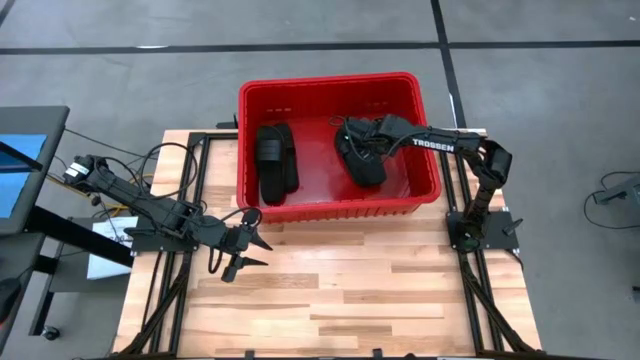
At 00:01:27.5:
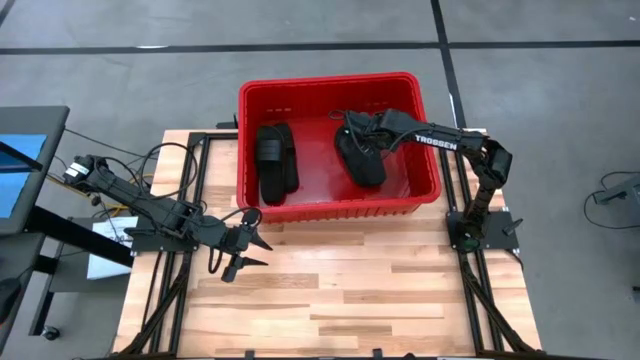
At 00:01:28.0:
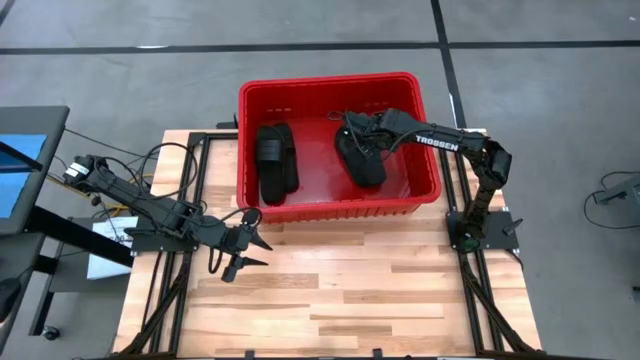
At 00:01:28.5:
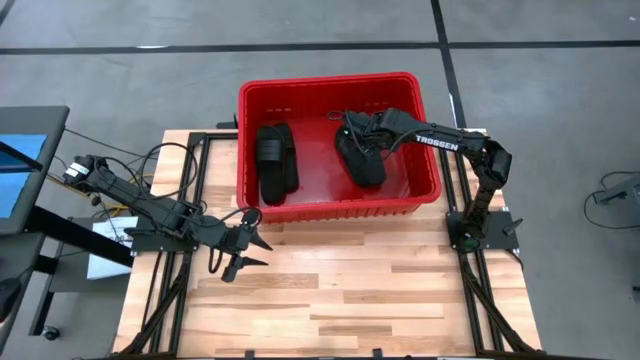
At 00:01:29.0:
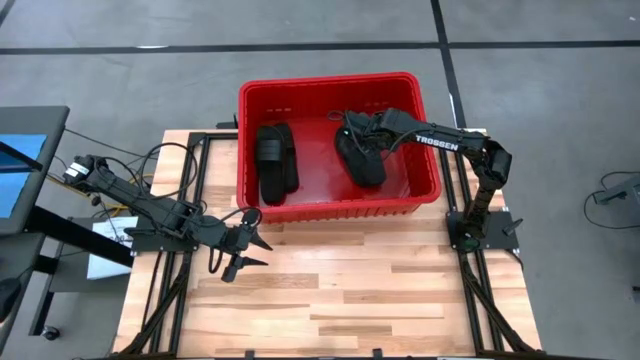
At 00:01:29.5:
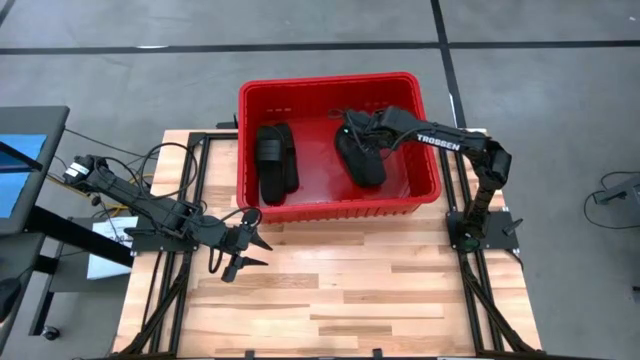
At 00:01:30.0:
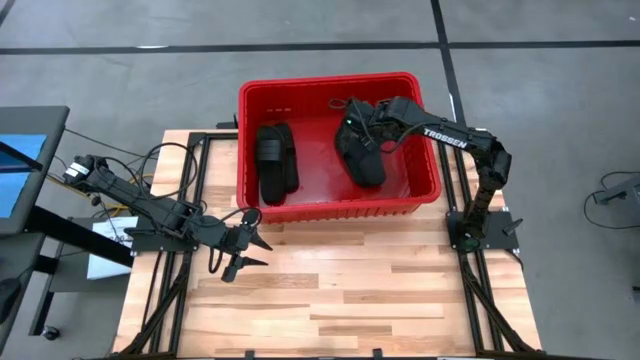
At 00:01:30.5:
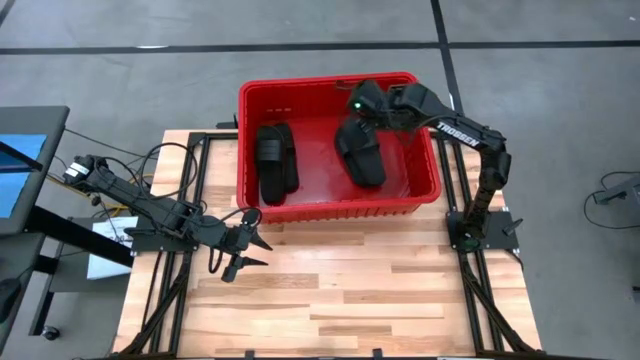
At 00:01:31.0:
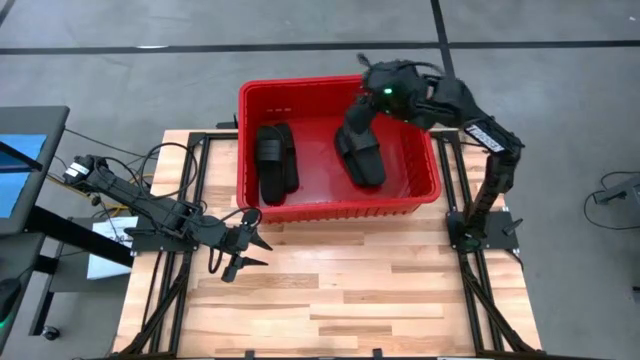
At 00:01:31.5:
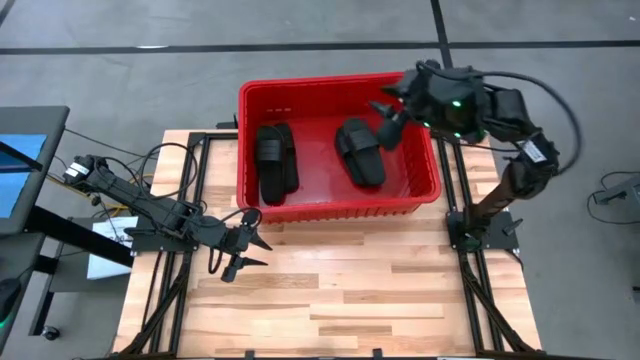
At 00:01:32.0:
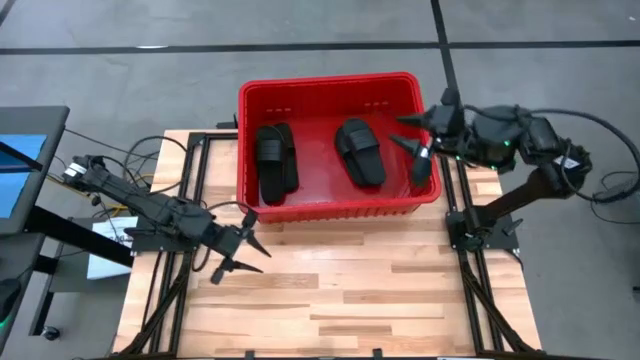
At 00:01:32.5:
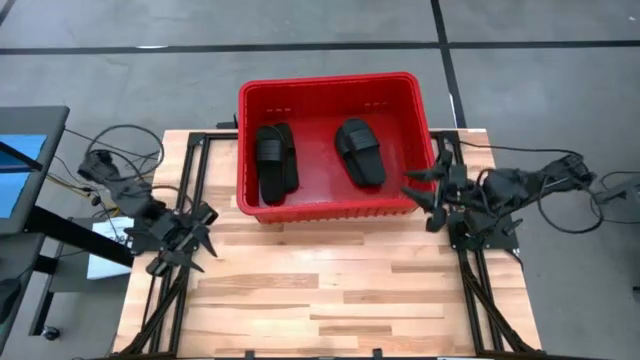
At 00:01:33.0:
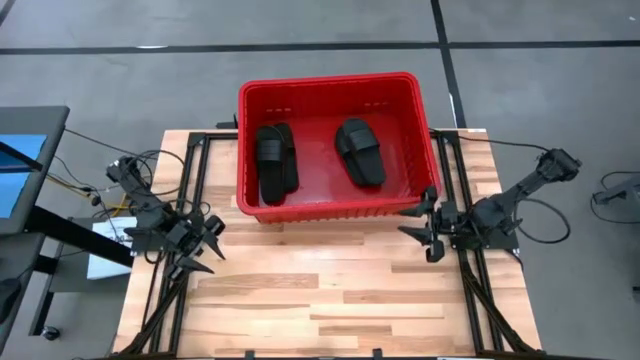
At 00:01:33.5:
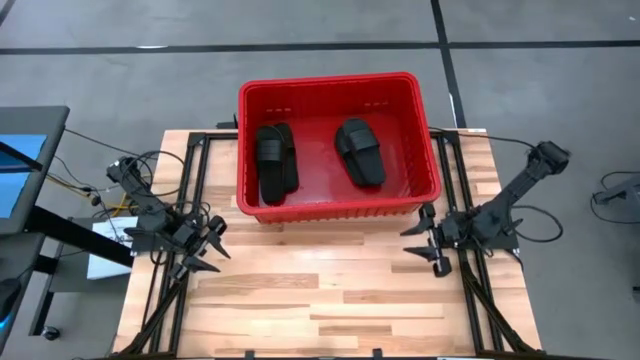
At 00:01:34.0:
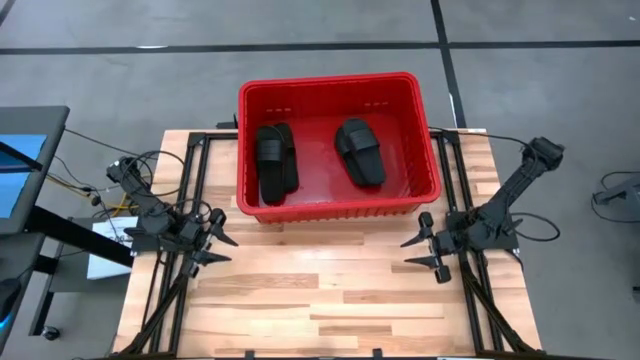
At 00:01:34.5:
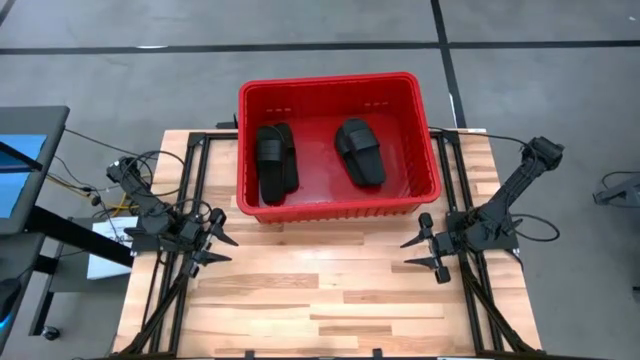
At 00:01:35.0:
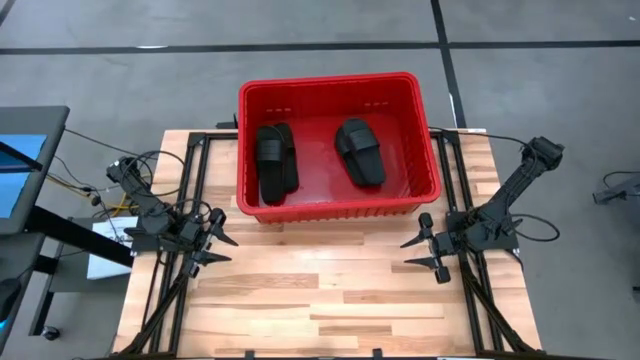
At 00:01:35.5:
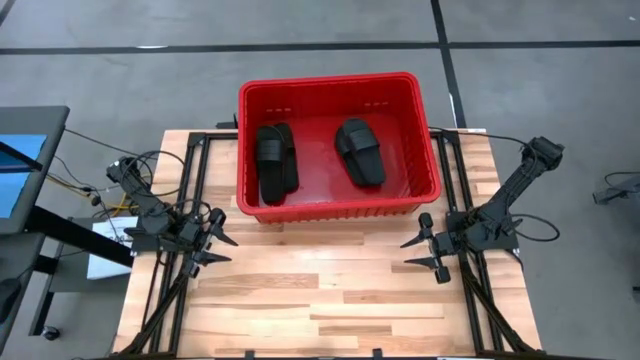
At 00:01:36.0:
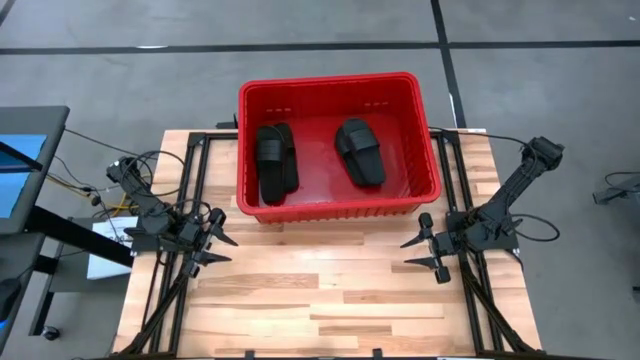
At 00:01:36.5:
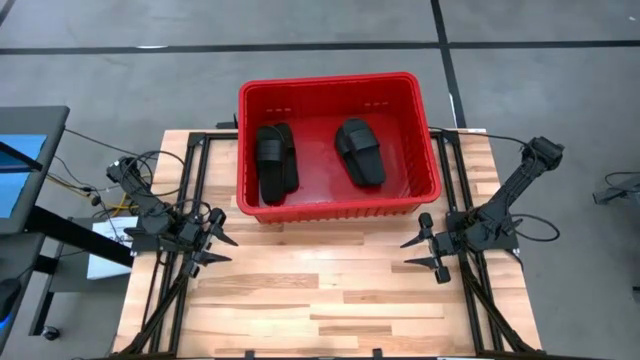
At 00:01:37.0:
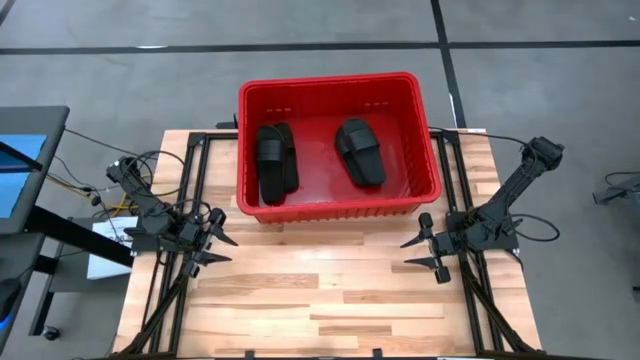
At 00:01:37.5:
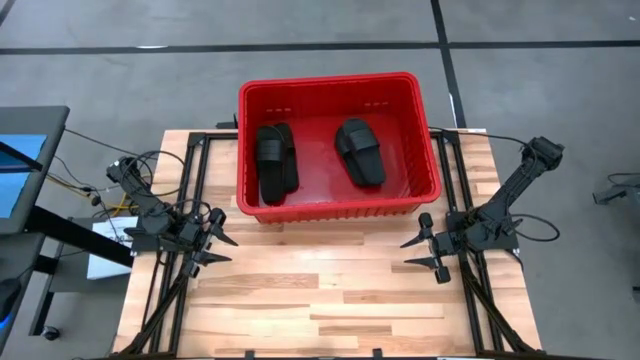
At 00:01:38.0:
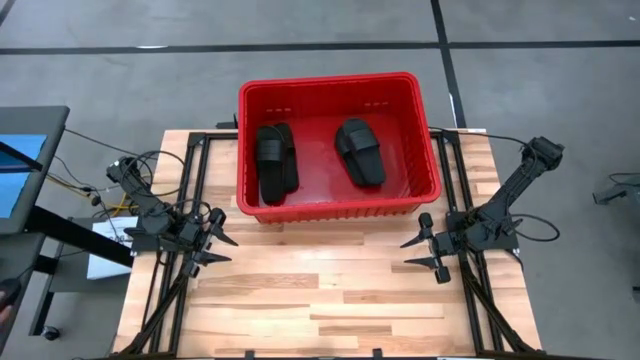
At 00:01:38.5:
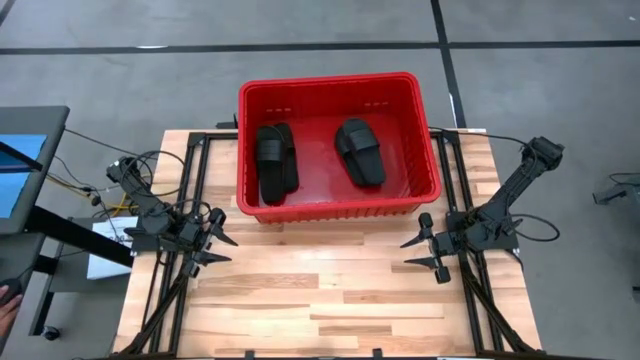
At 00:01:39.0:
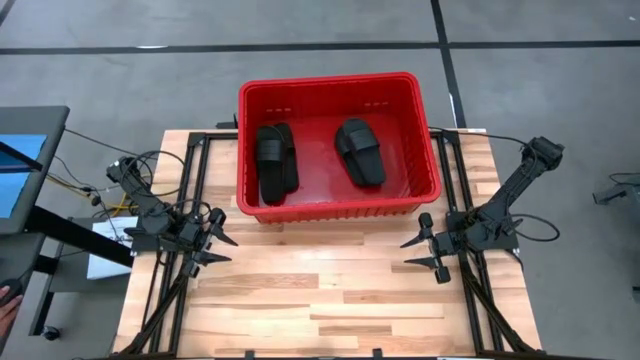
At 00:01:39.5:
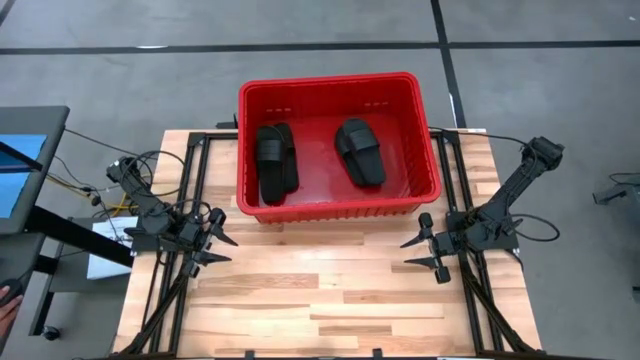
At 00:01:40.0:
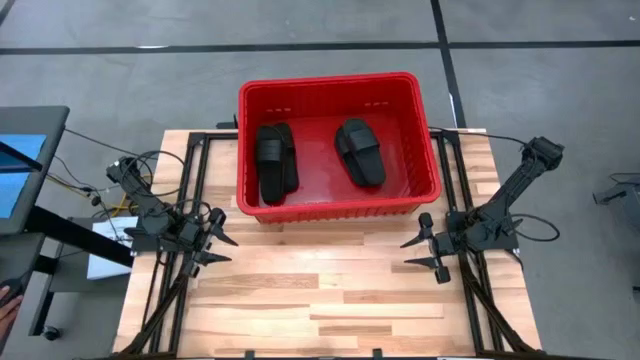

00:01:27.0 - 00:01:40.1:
Task: Pick and place slides into bin
Return to Home Position

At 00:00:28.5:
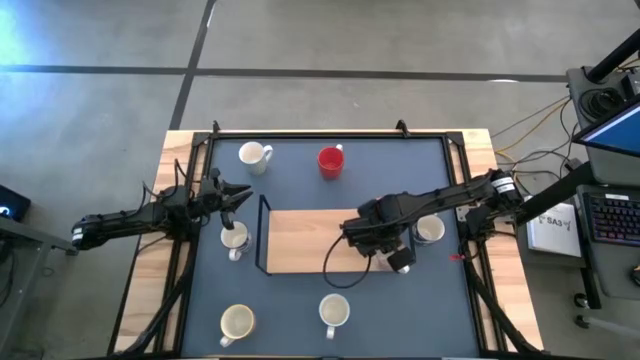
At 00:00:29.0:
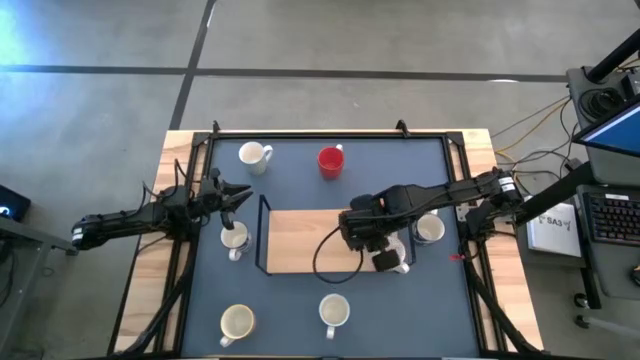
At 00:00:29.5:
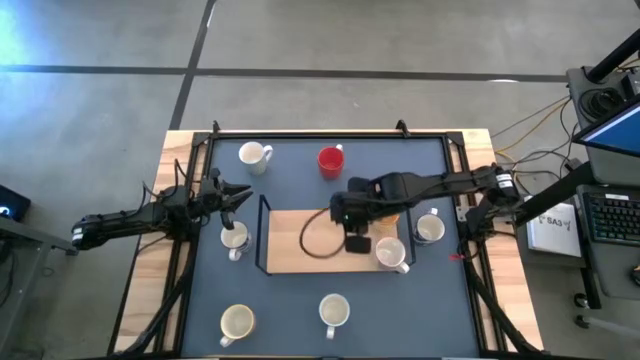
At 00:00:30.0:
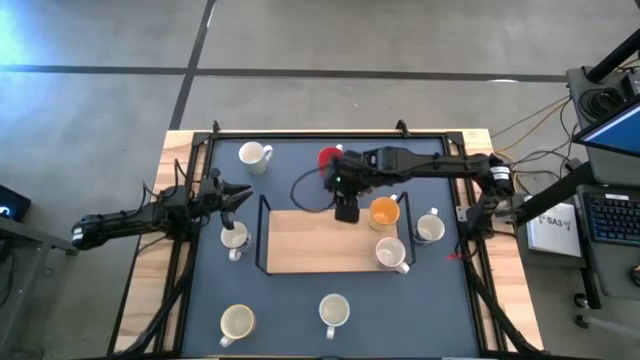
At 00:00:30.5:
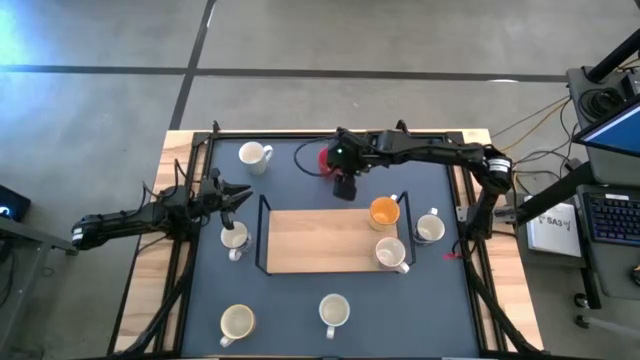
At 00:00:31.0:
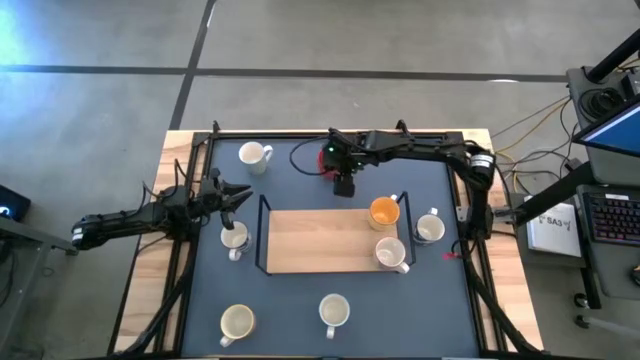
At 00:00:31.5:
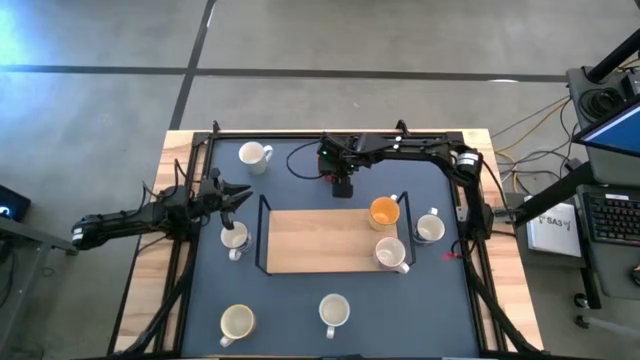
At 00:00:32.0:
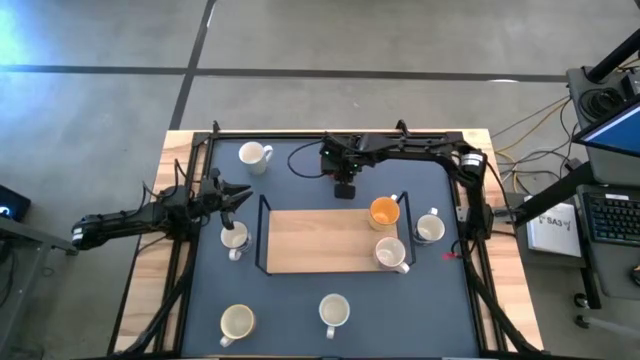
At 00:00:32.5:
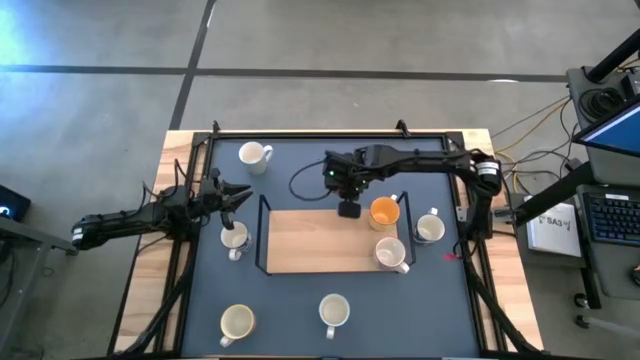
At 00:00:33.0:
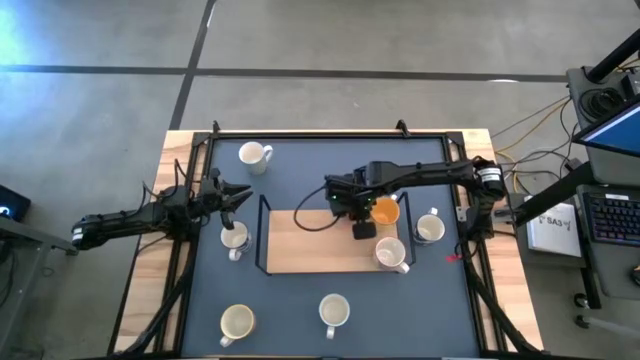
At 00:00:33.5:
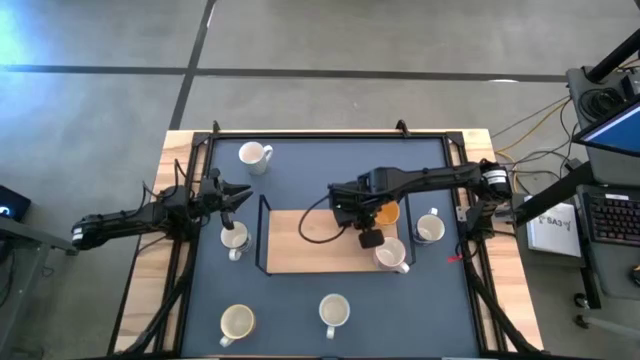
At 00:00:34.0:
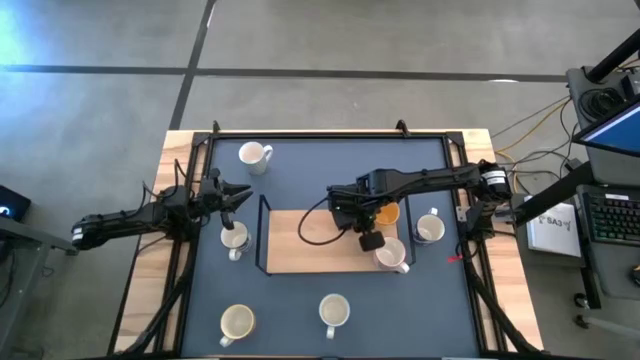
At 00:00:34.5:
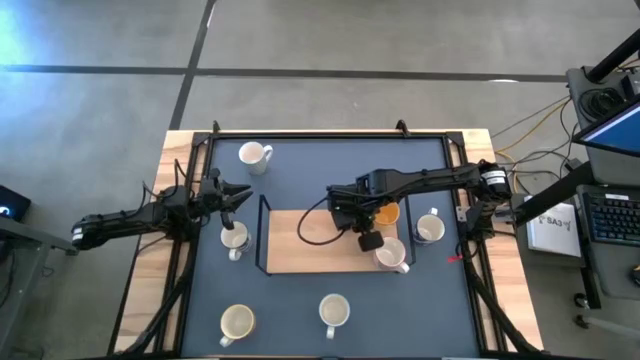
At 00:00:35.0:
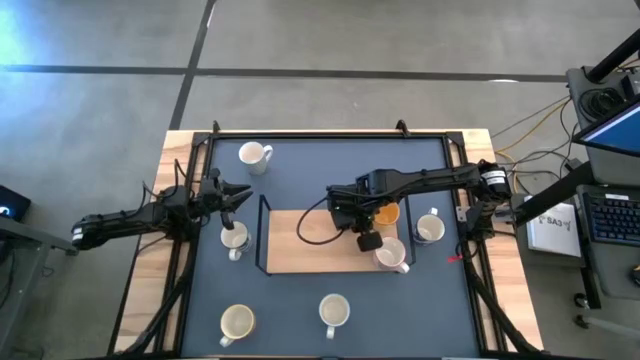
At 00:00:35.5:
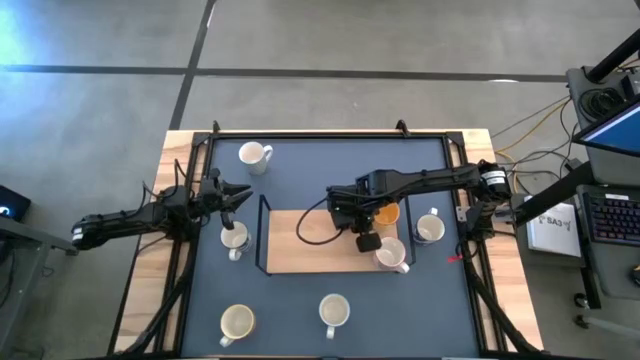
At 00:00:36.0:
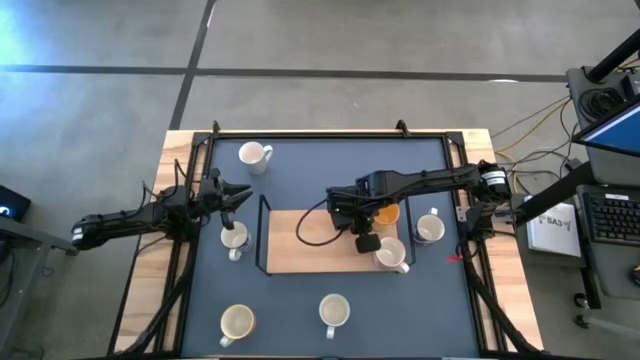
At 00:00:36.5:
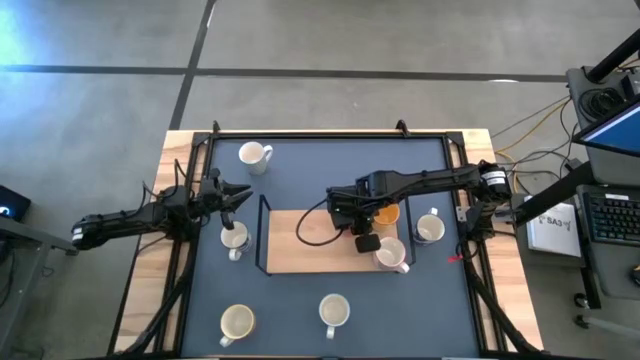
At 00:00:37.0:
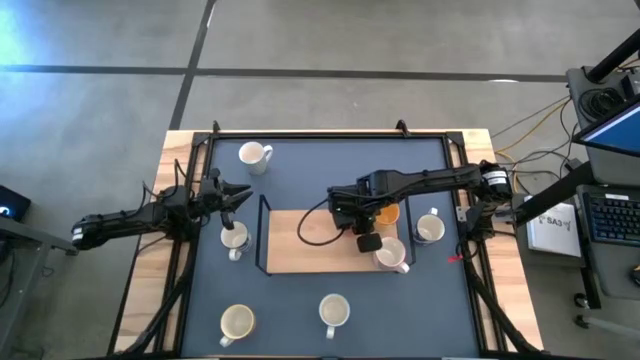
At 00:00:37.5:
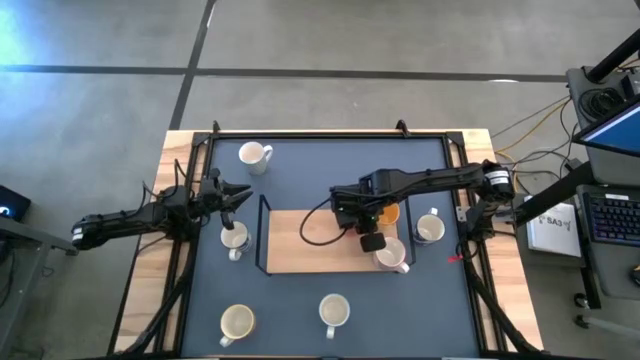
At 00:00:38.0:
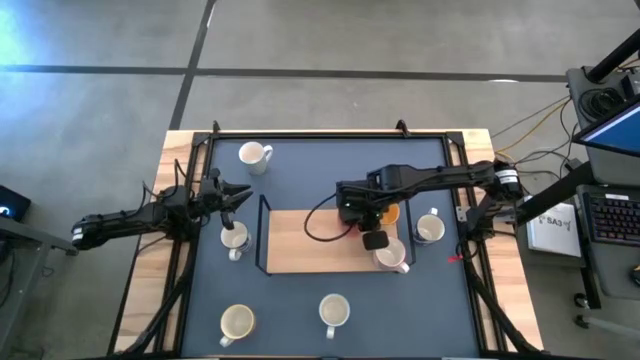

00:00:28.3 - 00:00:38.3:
Task: Place coffee mugs
Put the top red cup on the shelf
